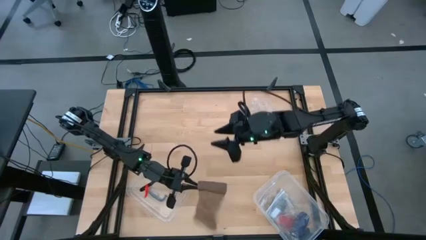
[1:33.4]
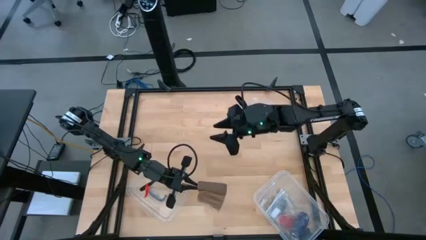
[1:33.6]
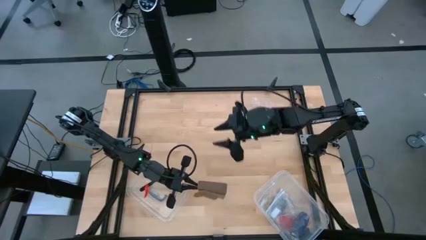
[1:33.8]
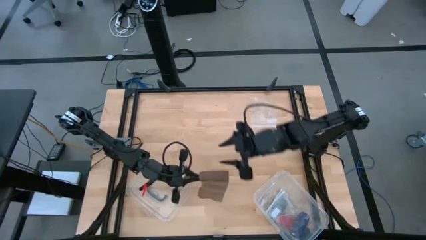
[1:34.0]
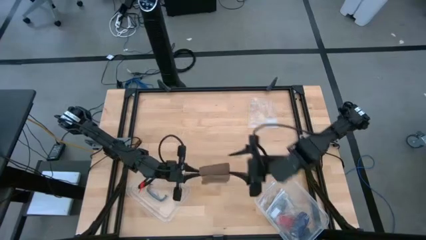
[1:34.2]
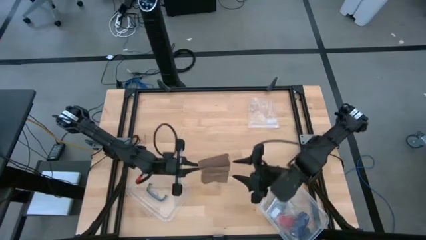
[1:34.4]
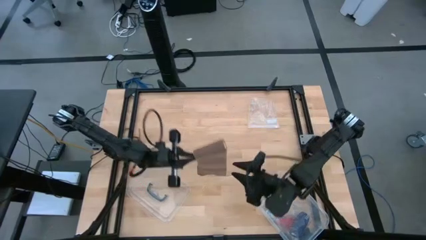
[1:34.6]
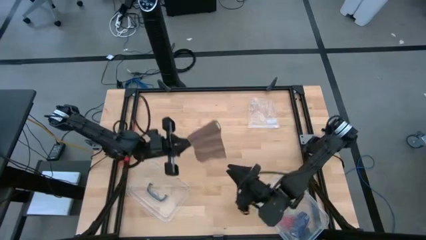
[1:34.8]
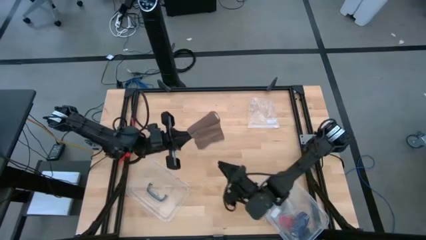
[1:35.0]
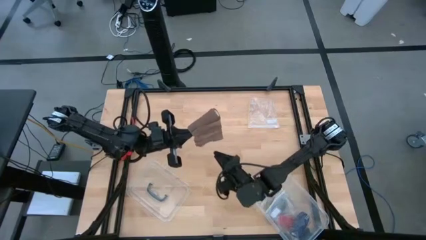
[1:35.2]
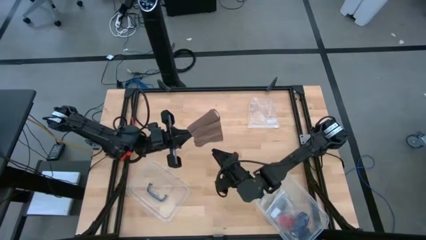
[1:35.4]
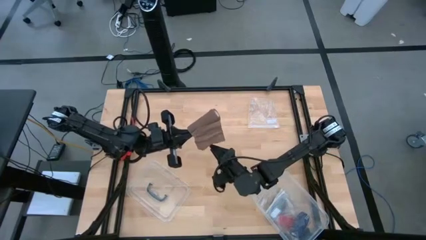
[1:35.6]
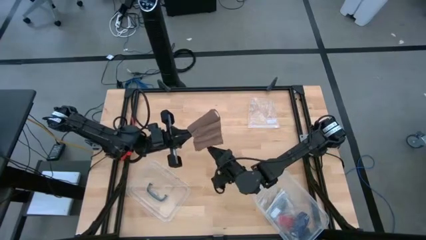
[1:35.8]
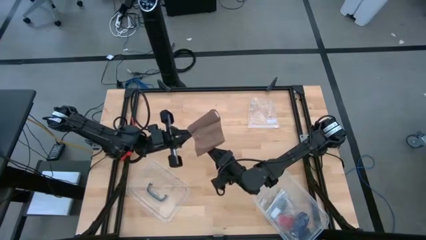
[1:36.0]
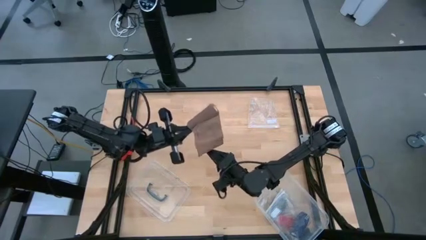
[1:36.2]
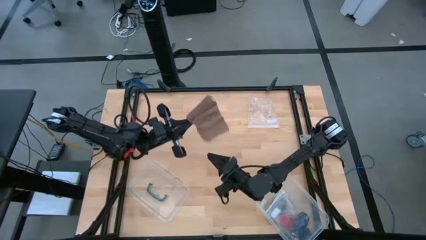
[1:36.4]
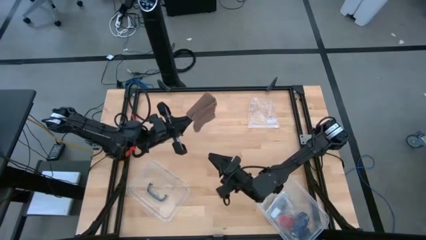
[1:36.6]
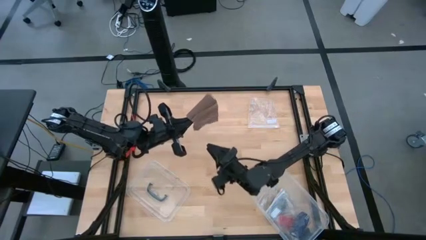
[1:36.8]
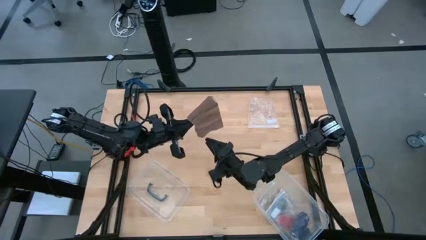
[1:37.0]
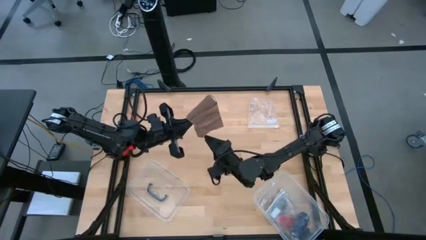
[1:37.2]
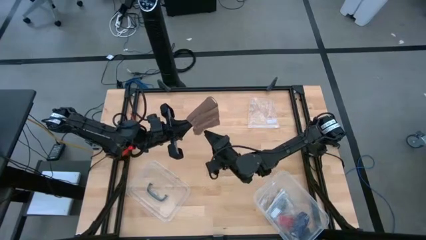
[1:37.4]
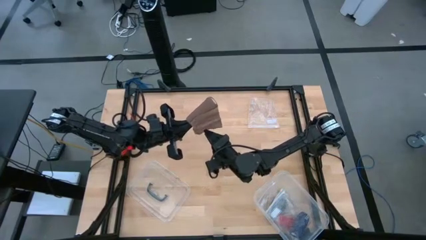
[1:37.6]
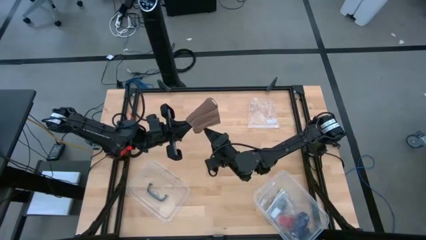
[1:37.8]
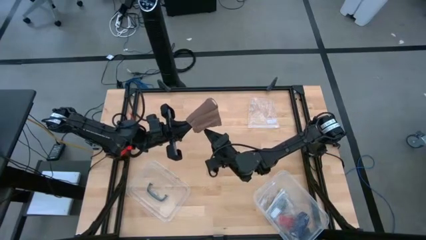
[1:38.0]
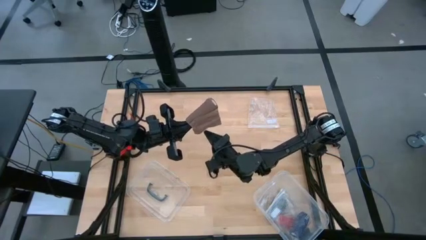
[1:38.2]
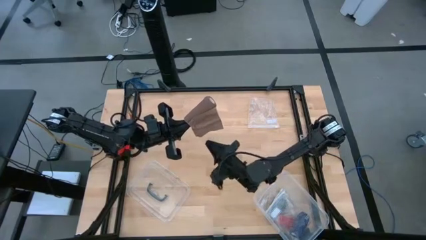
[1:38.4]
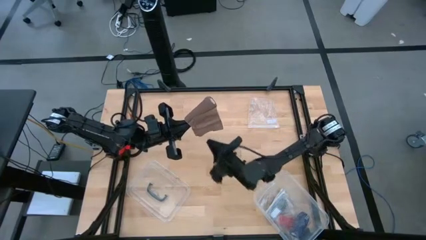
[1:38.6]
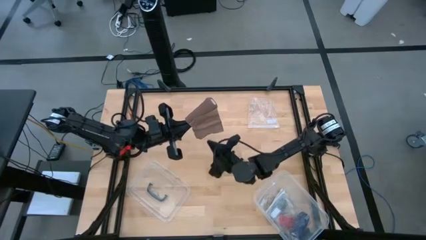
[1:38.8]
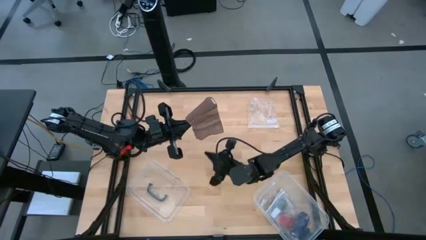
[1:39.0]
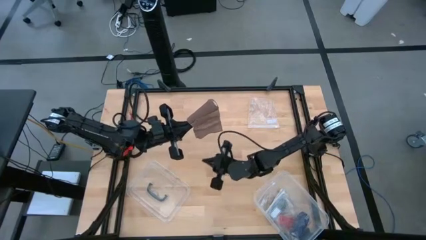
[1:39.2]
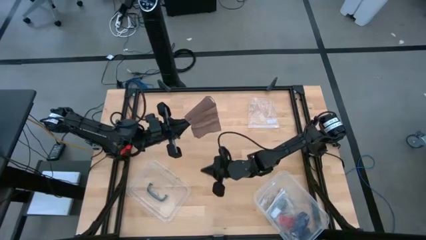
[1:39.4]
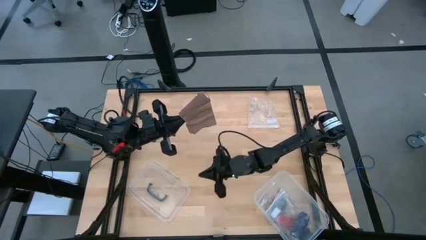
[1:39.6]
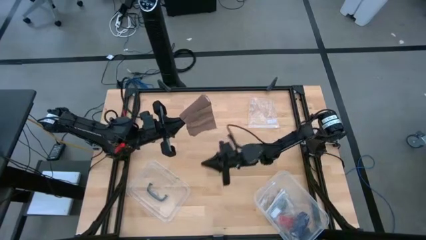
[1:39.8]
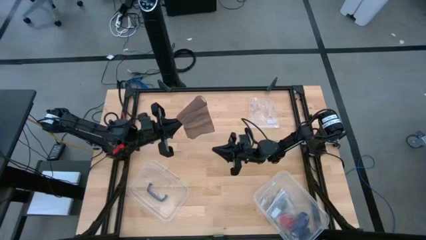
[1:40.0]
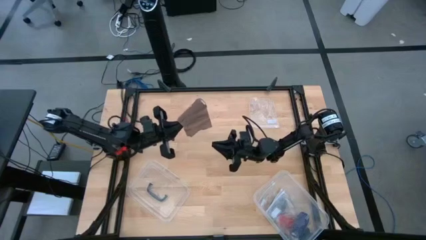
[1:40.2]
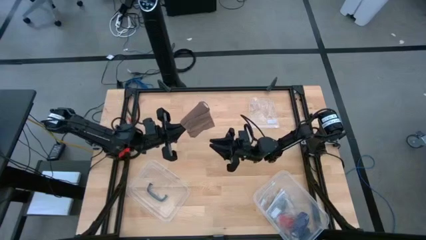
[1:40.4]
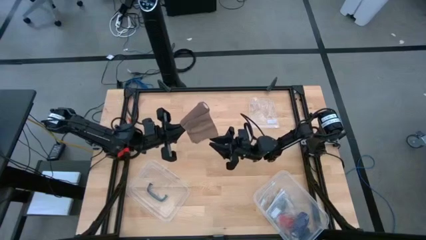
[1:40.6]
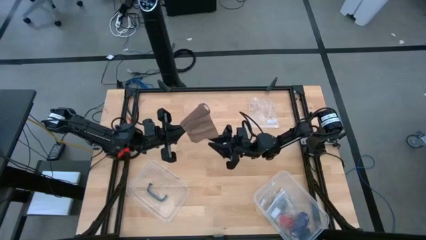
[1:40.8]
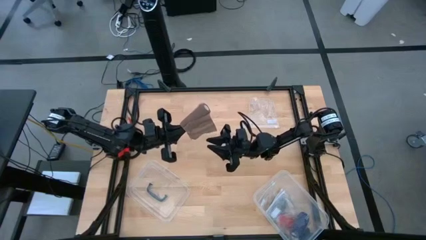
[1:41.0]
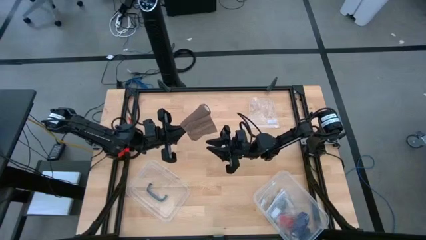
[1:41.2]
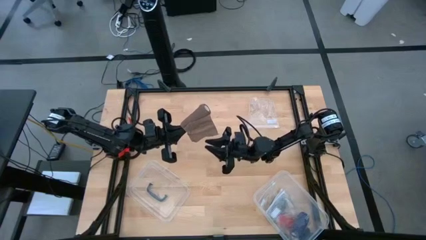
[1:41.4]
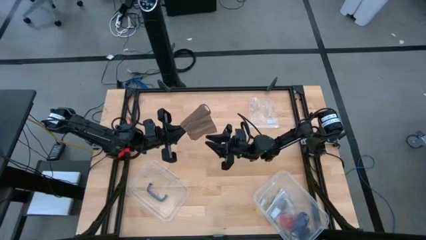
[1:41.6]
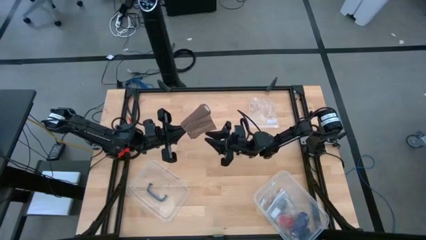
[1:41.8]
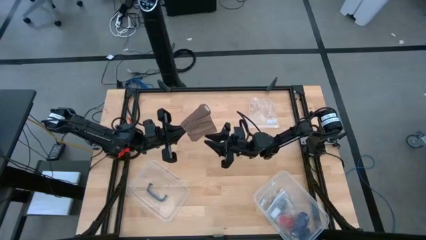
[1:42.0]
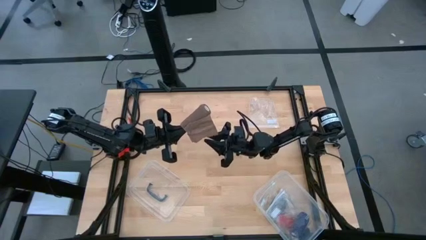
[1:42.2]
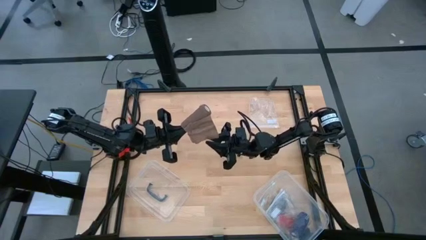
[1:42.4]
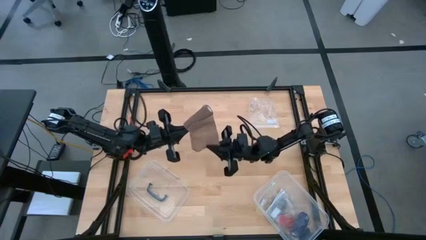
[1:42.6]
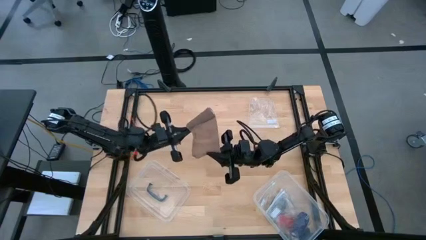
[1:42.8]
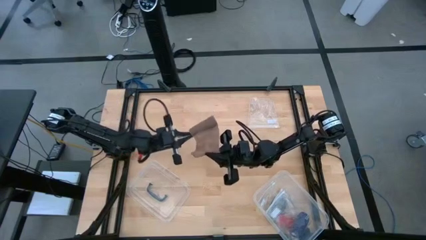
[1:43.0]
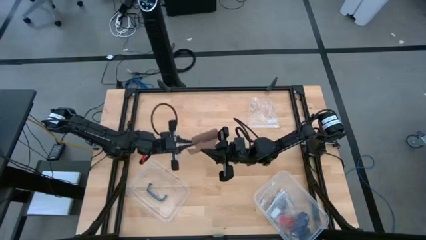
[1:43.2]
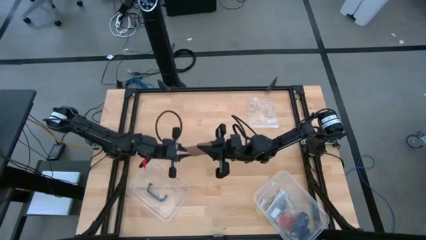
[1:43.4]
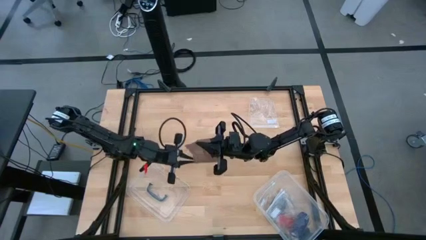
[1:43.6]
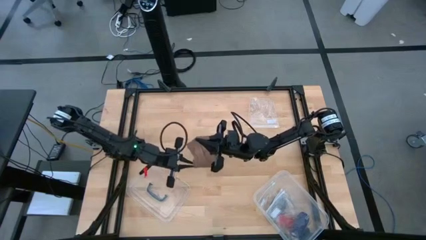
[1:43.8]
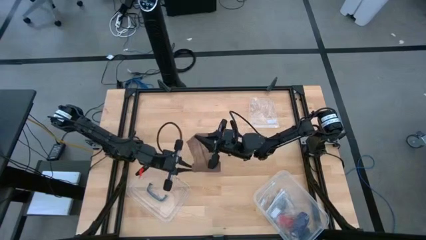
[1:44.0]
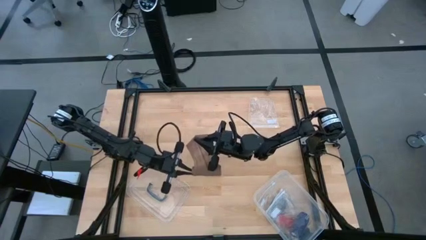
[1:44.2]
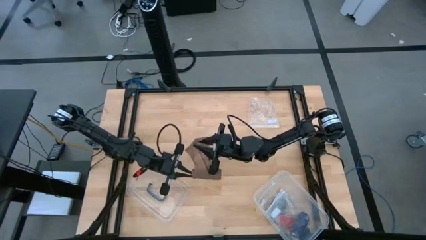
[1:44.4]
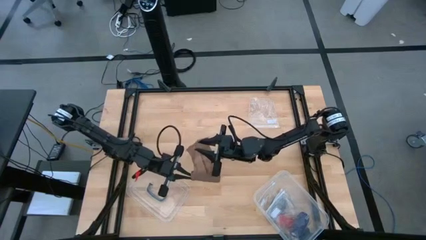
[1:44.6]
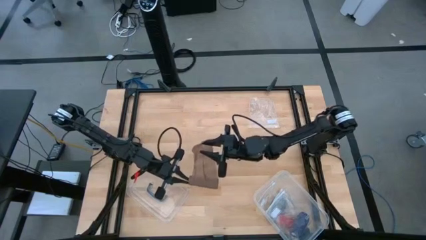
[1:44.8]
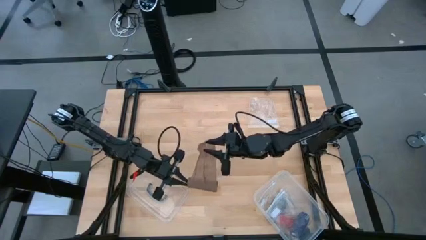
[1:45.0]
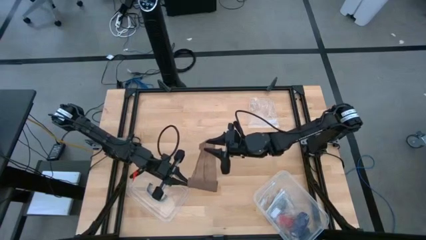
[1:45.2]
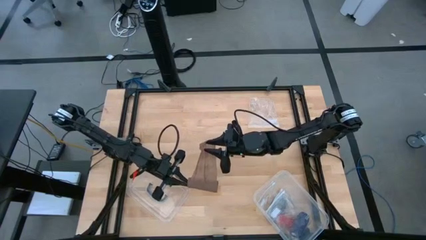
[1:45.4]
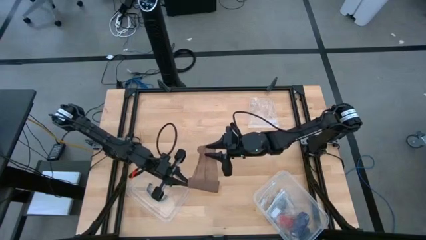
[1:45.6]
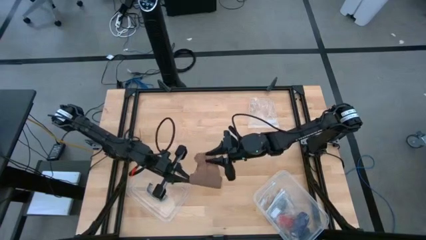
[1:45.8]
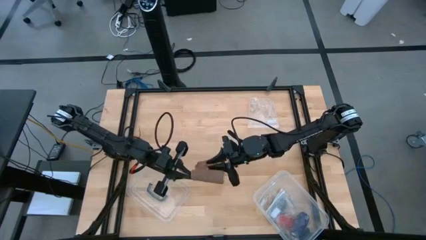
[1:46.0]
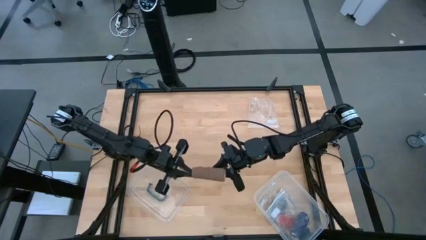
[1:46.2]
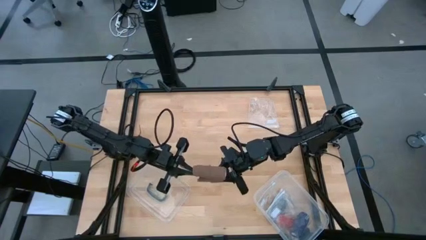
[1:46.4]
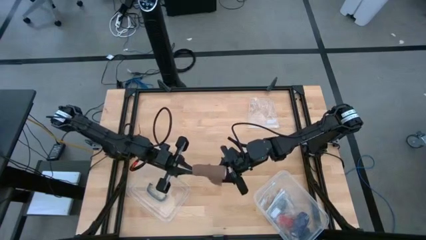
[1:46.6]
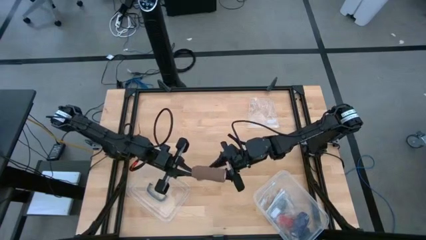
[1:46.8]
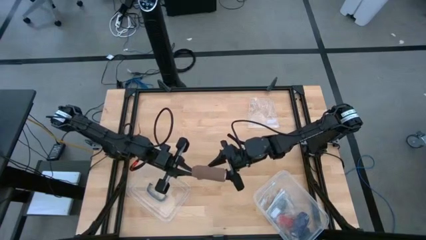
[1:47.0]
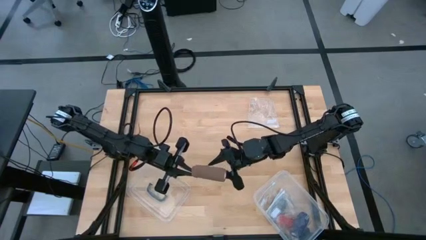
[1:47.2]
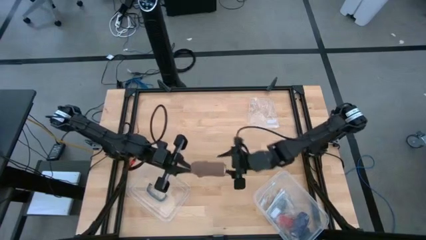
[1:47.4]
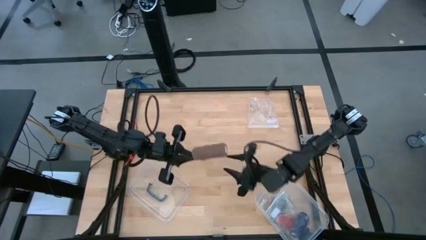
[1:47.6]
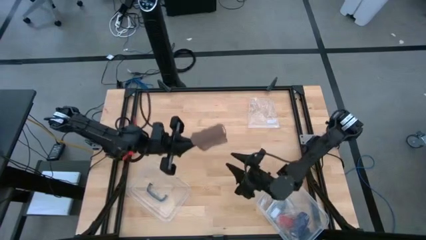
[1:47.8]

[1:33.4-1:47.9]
Task: Roll bandage
Roll the brown bandage

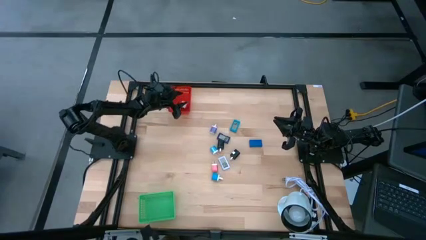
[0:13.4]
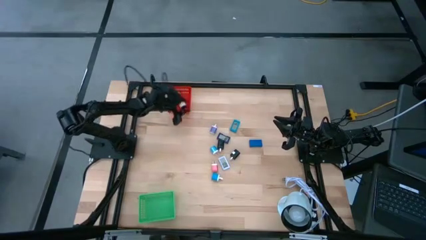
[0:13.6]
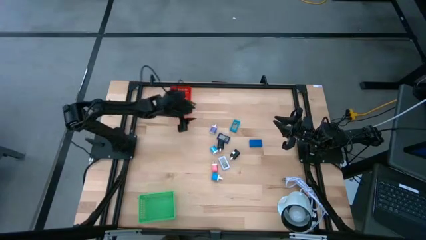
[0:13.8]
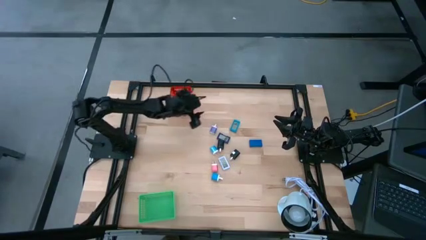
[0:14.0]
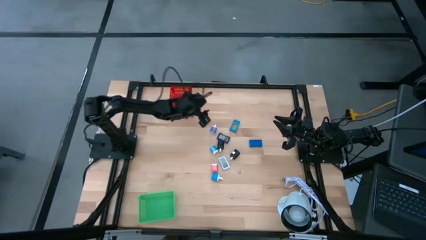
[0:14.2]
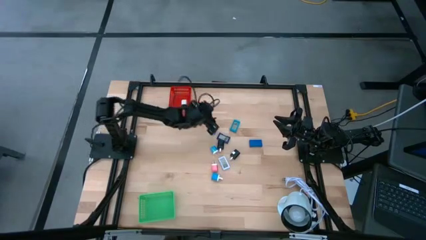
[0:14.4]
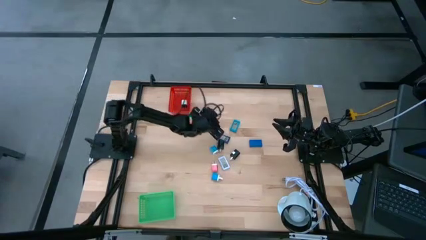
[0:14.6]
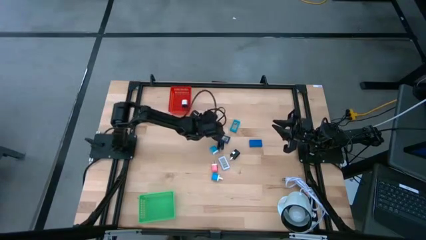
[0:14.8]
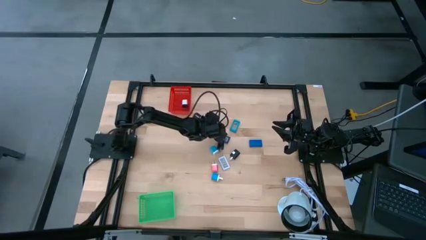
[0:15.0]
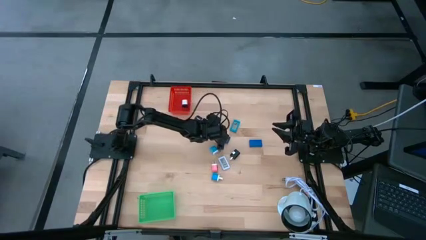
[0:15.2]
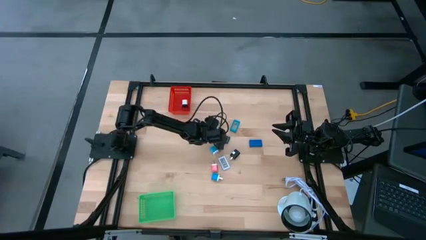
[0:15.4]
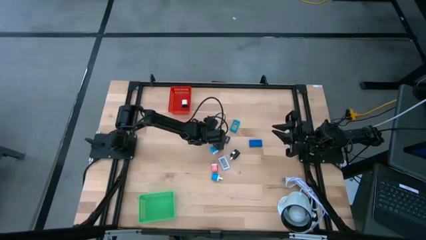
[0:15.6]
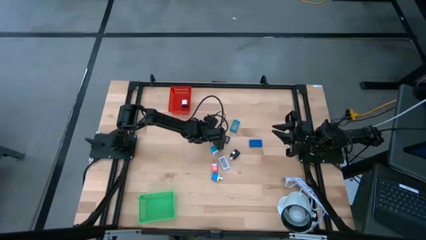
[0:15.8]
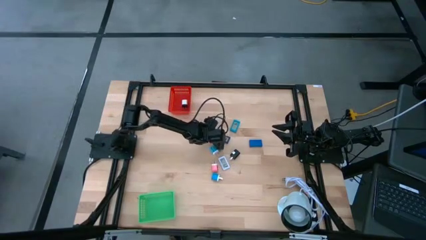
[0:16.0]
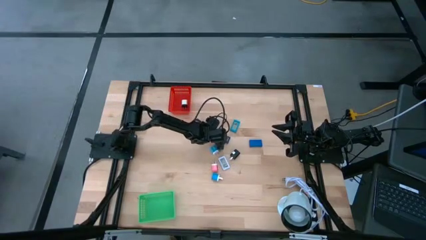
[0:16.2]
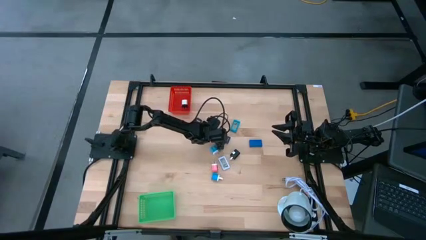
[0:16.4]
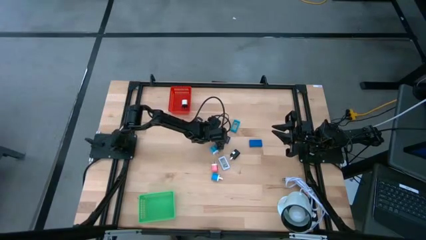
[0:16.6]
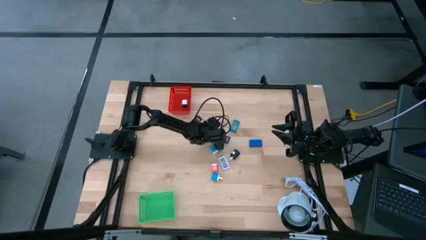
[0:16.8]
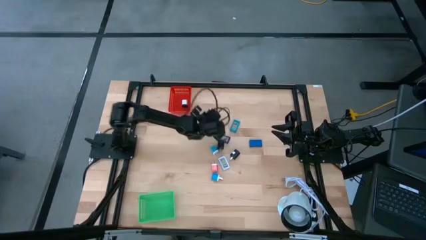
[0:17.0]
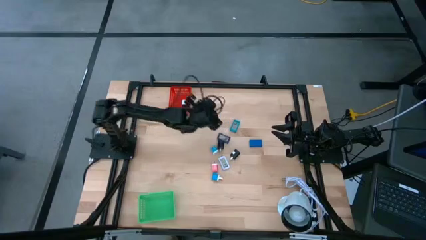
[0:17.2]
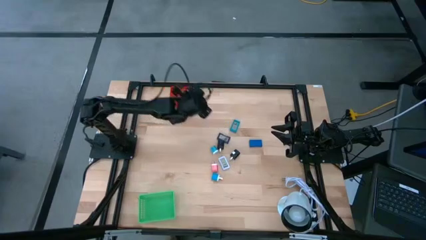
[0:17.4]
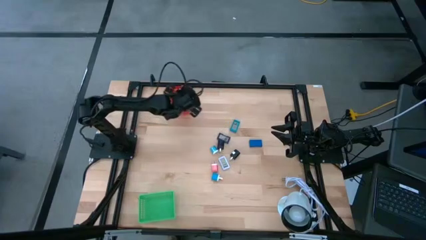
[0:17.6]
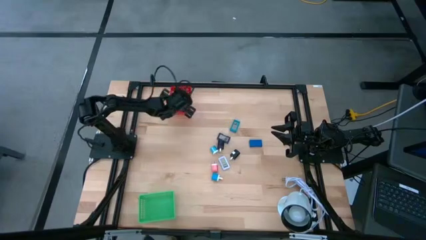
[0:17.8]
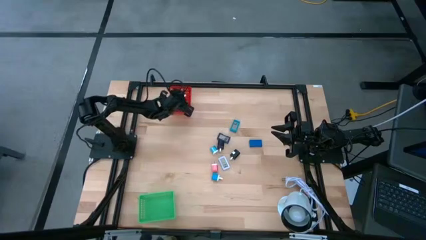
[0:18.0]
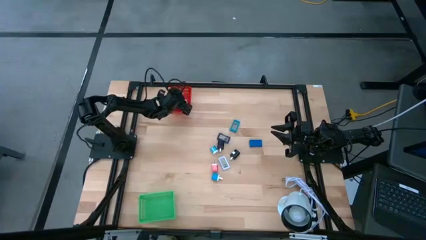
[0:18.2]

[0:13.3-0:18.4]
Task: Pick & Place Office items
Put the purple charger adapter into the red bin
